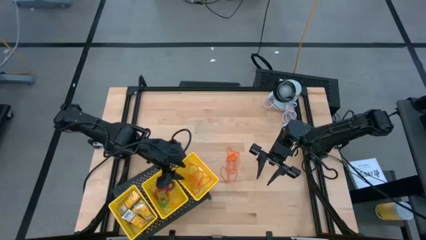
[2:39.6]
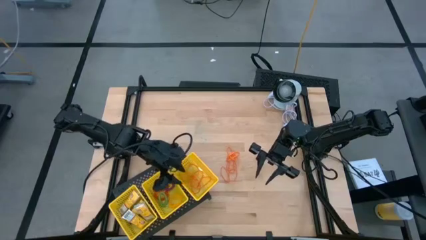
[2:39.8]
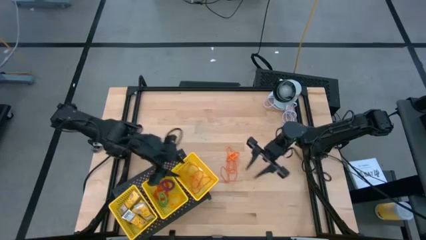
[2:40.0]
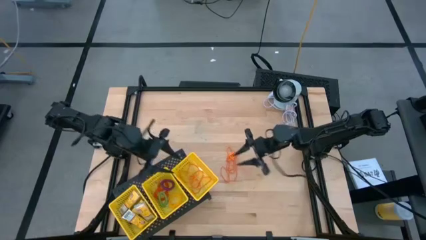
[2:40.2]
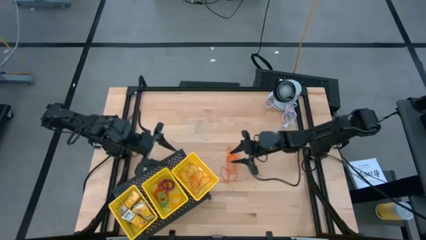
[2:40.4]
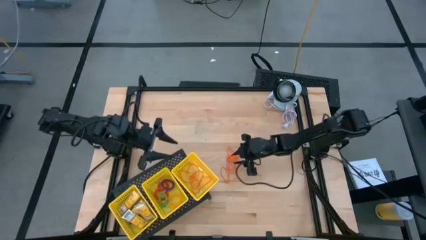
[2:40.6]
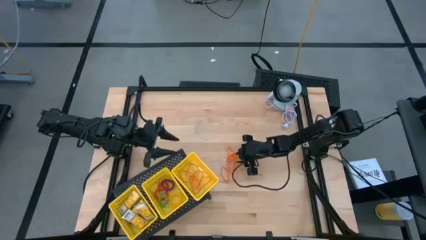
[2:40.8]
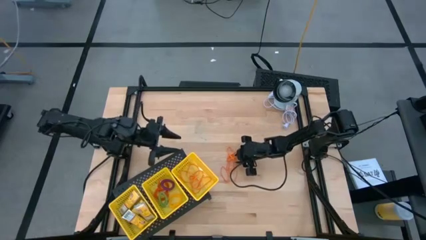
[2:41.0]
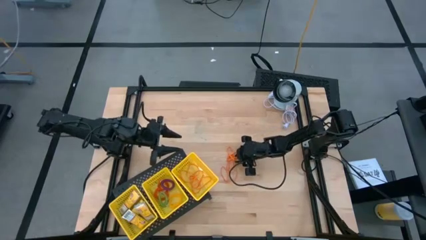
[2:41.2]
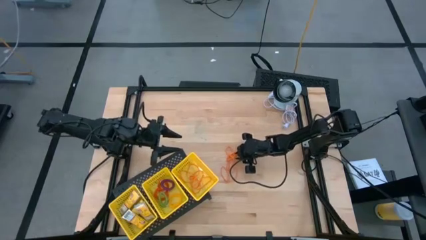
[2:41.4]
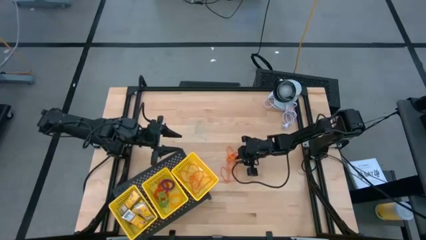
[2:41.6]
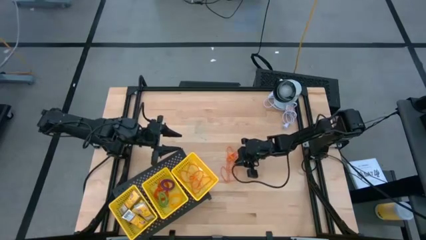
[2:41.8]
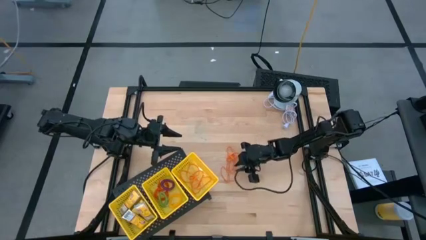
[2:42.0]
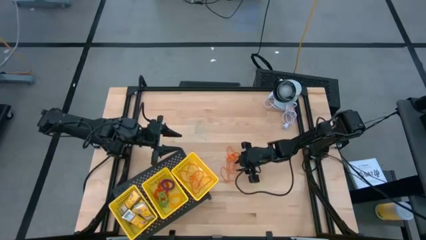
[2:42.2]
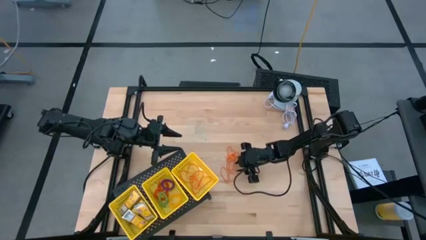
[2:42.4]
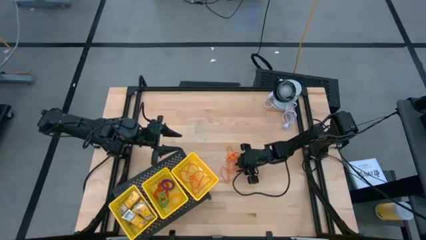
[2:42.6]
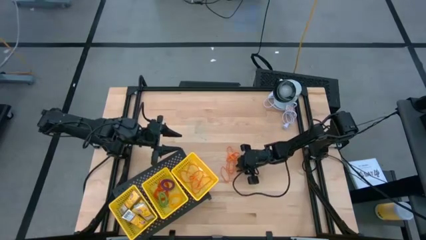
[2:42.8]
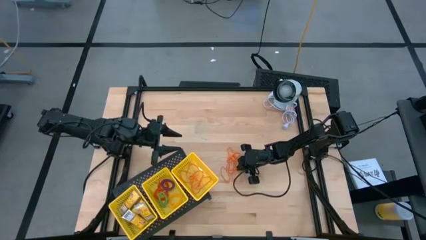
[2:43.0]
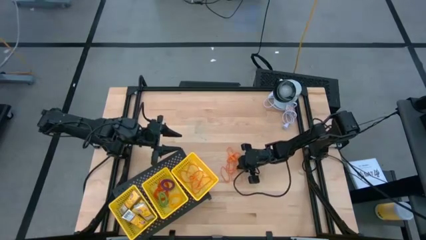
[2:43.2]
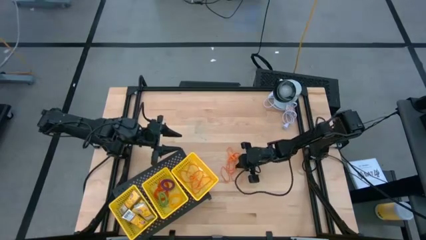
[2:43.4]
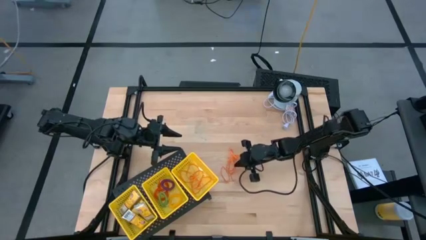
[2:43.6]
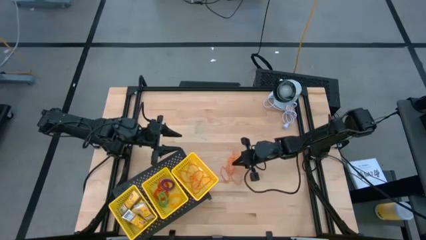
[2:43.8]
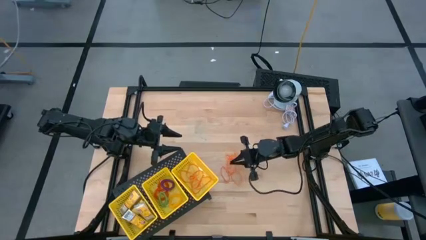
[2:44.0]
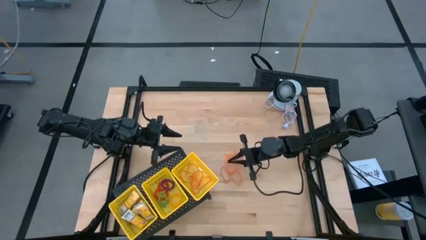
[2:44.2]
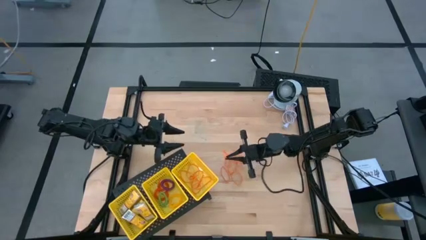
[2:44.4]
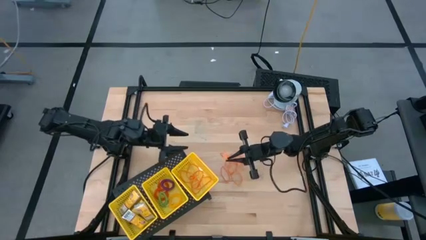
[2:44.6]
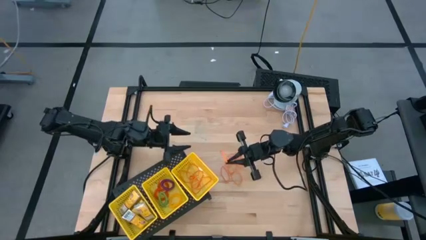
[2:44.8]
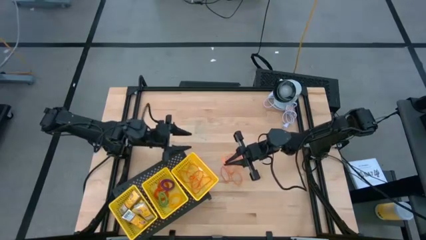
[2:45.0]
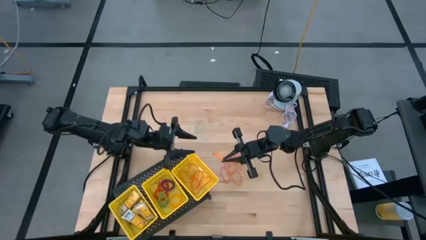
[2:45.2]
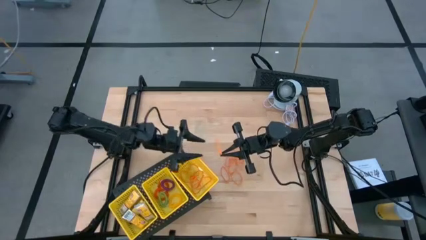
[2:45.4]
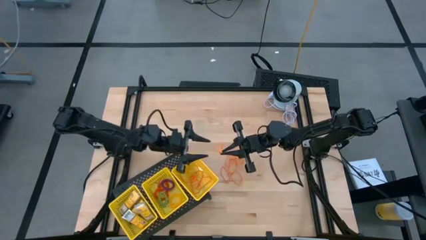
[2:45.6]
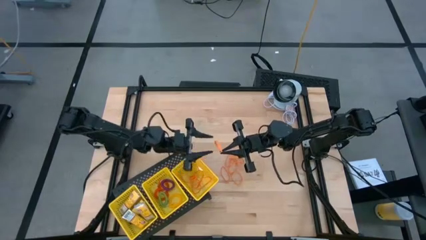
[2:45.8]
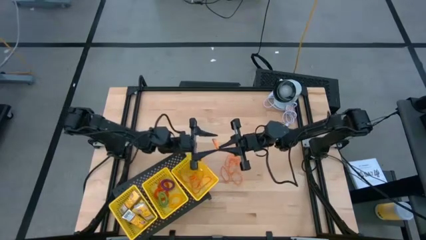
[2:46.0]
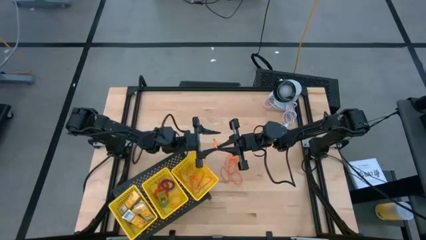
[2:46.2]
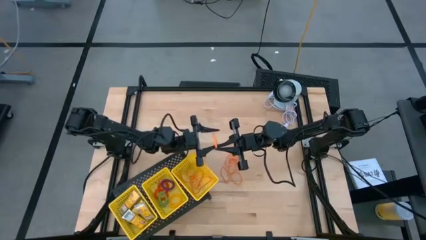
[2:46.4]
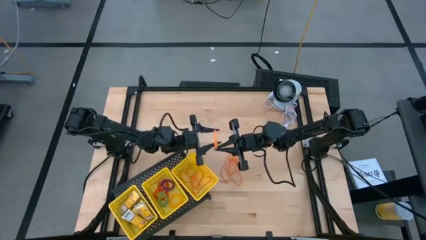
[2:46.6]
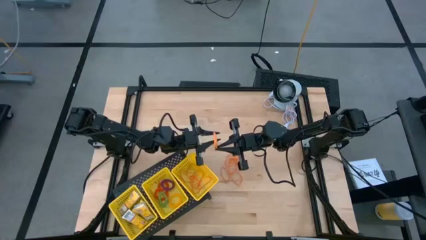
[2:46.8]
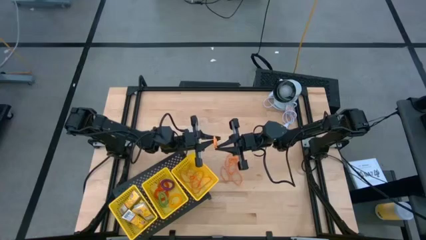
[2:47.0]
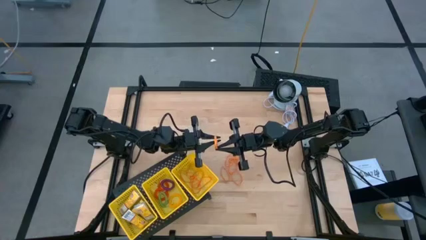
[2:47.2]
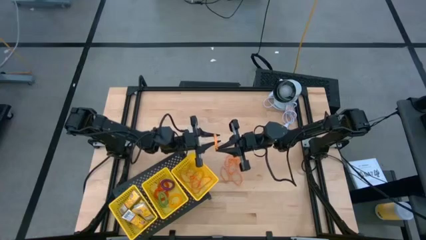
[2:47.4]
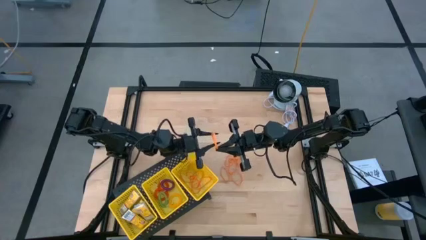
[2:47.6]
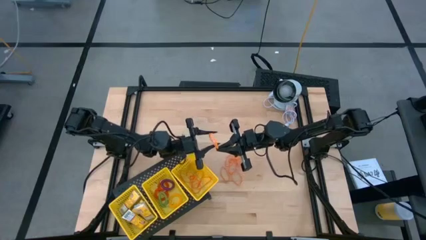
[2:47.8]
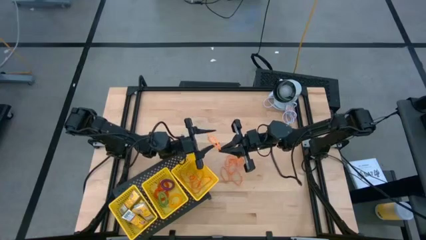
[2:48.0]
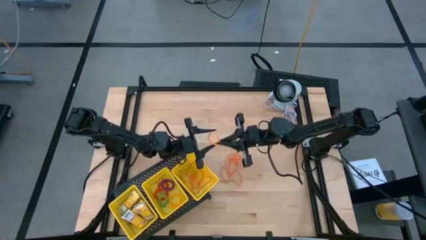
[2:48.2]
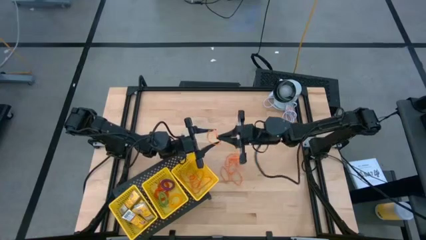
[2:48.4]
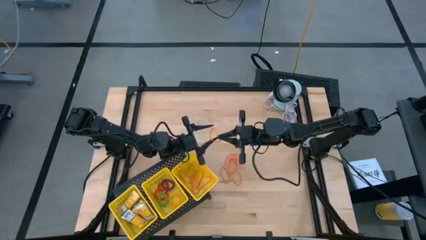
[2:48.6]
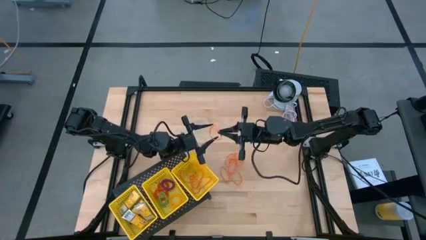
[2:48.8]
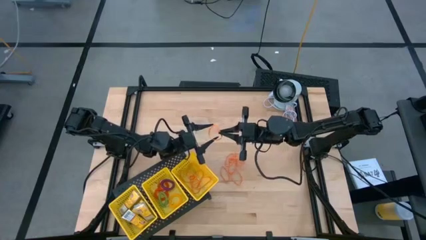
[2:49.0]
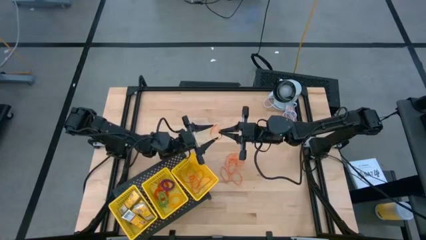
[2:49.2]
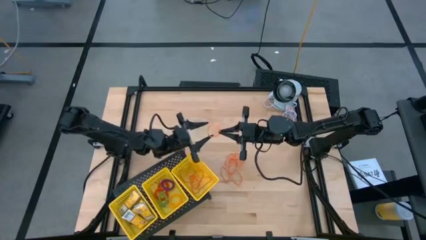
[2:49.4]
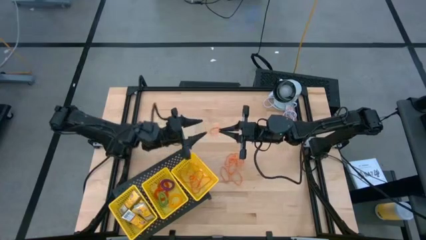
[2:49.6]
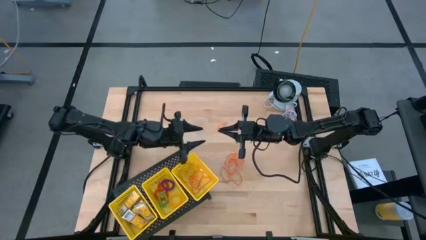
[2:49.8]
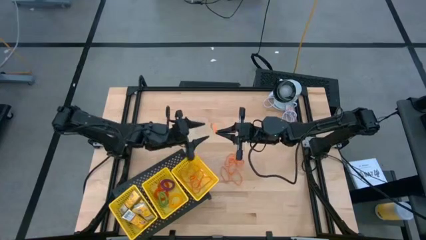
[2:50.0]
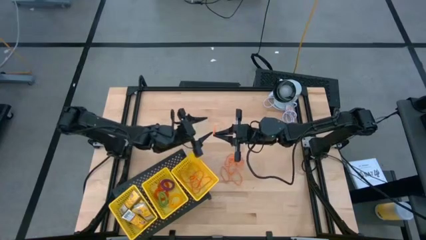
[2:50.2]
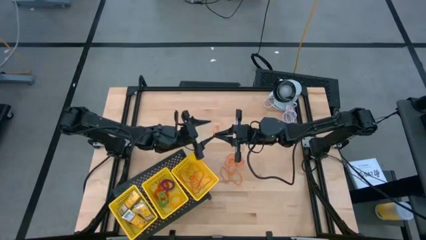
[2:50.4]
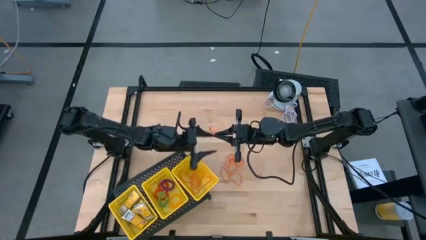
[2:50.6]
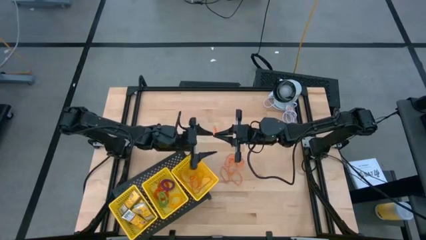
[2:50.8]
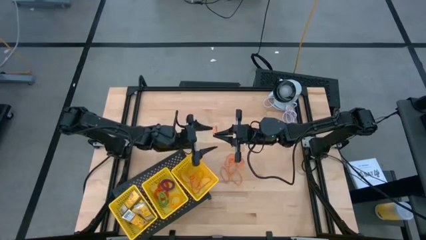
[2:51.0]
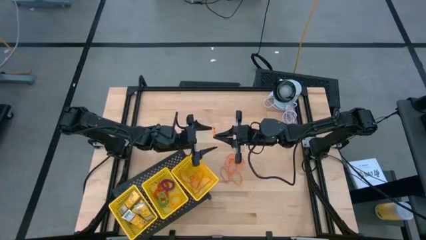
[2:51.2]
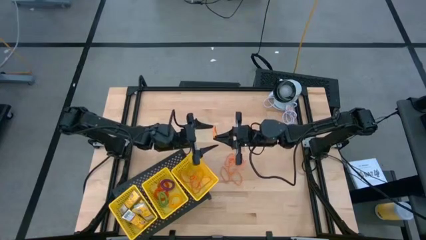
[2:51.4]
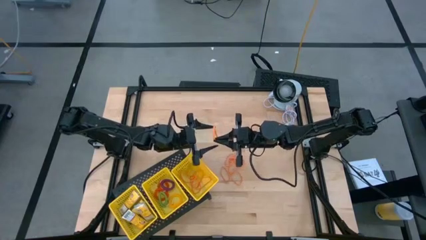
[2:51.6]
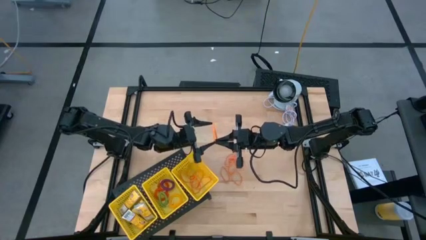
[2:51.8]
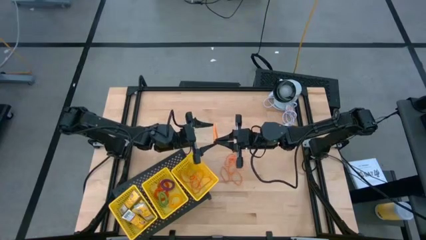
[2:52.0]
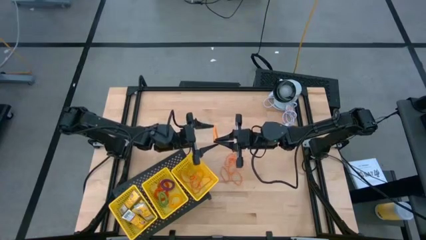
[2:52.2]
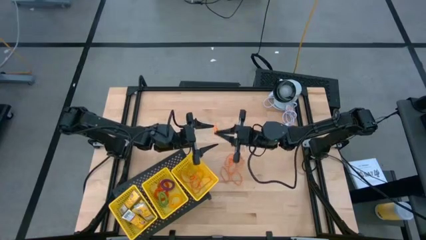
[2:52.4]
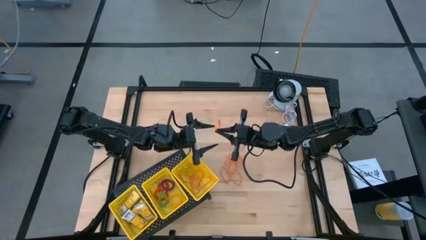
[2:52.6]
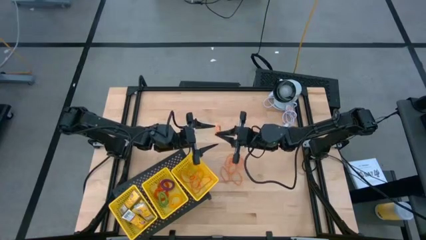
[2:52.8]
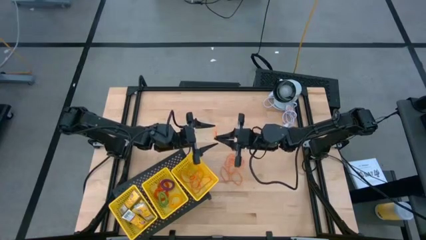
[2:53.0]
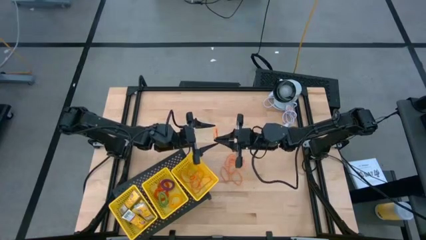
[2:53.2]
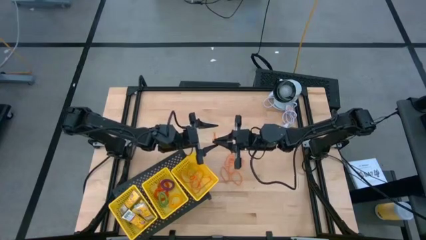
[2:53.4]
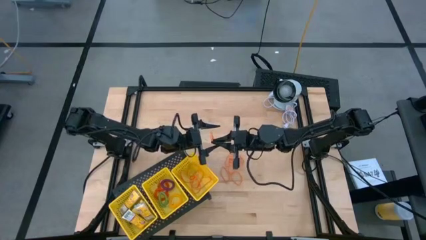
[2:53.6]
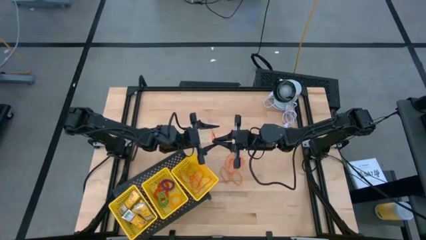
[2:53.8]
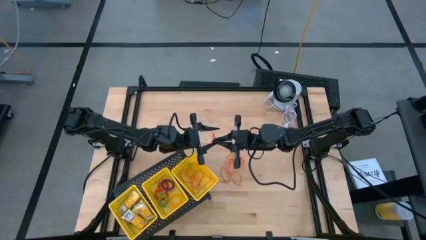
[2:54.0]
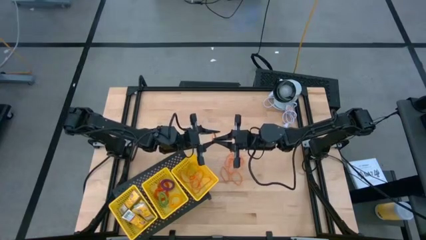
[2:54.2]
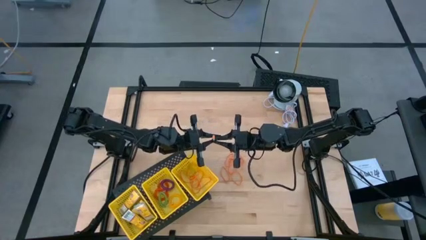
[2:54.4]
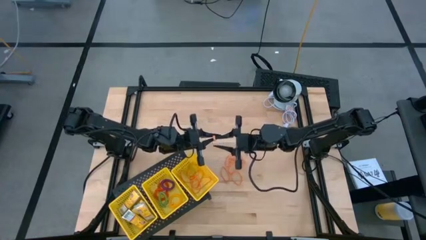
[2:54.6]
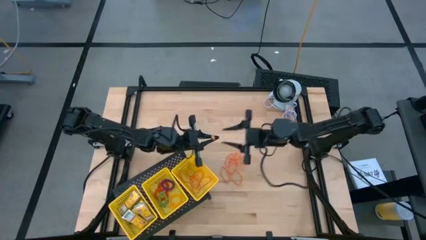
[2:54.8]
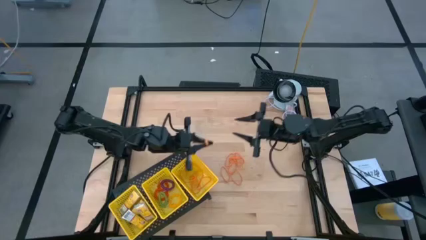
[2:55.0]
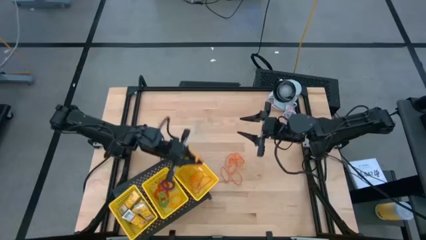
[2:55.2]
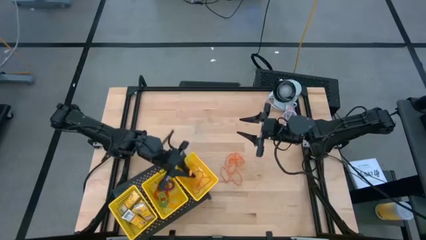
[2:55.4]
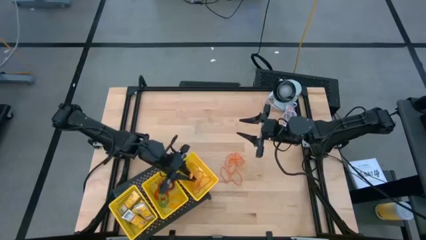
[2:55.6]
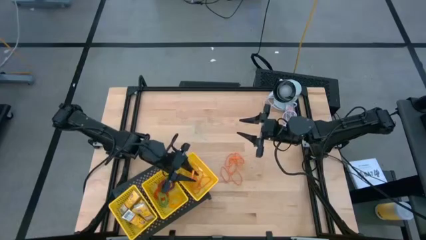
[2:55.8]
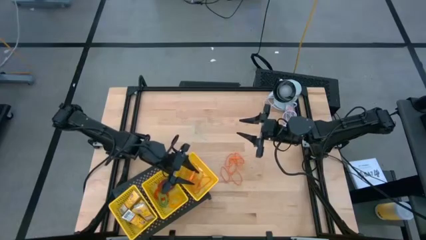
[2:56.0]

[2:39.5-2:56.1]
Task: Pick & Place Office Desk Supplies
Put the orange rubber band into the right yellow bin on the shelf
